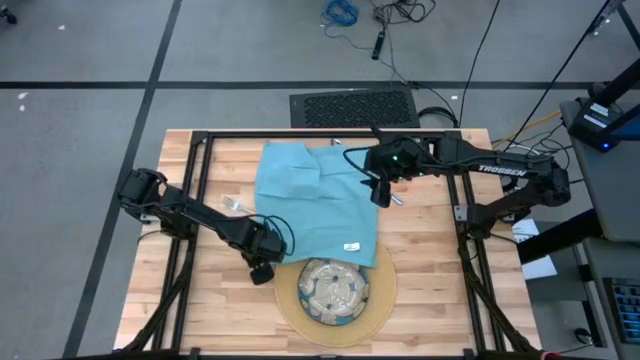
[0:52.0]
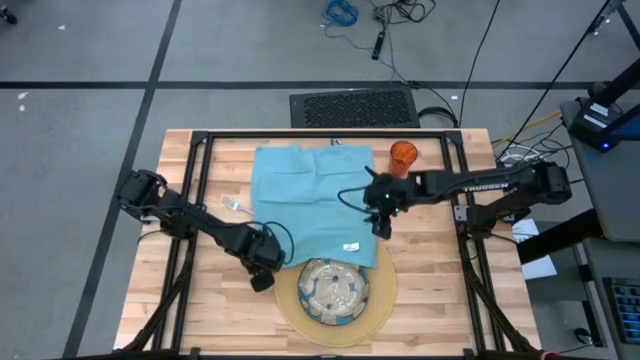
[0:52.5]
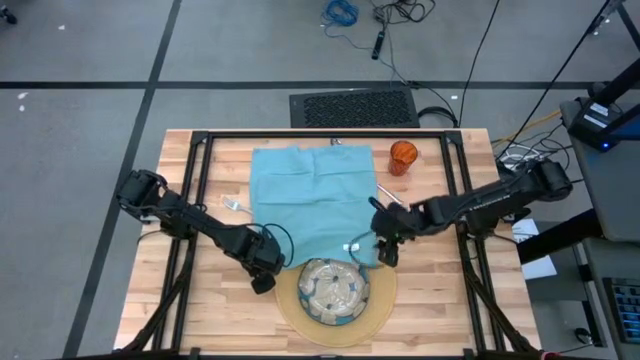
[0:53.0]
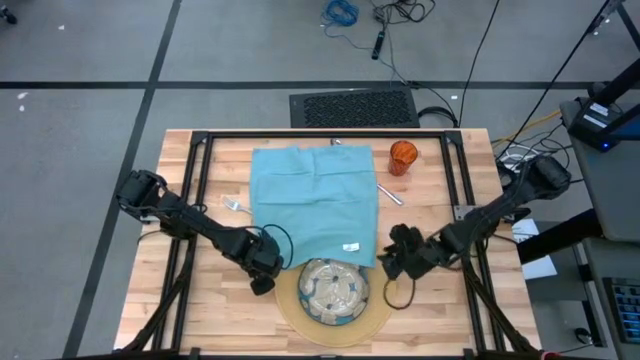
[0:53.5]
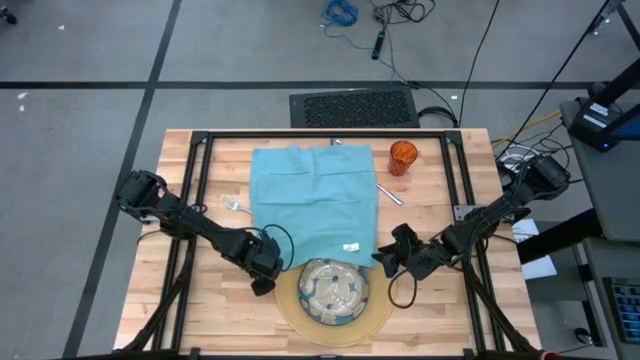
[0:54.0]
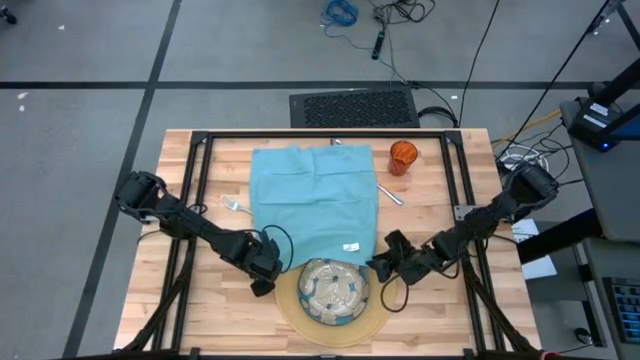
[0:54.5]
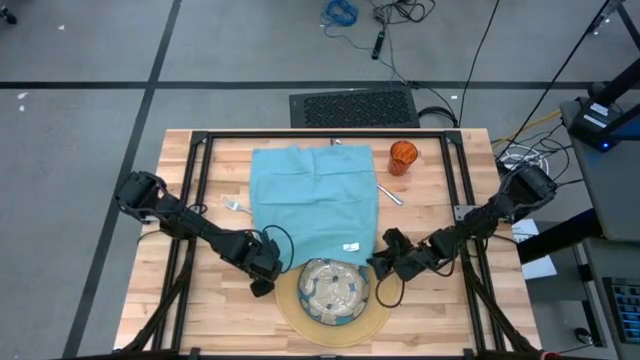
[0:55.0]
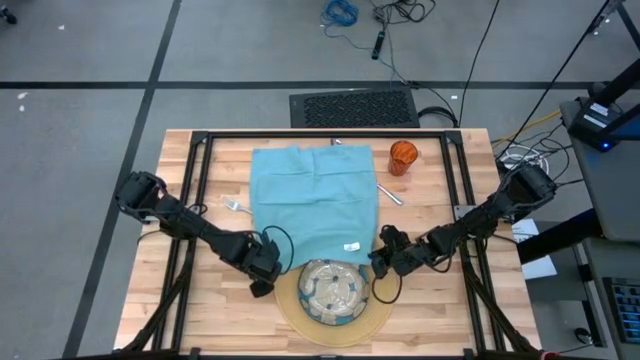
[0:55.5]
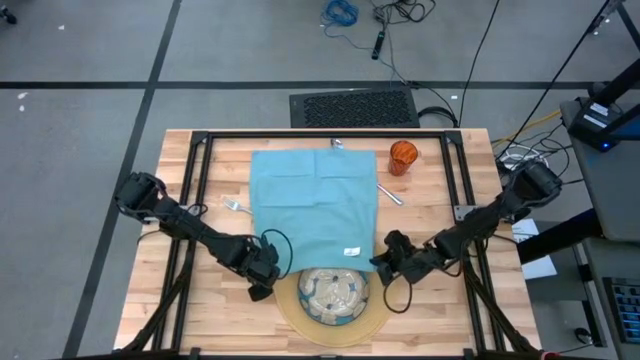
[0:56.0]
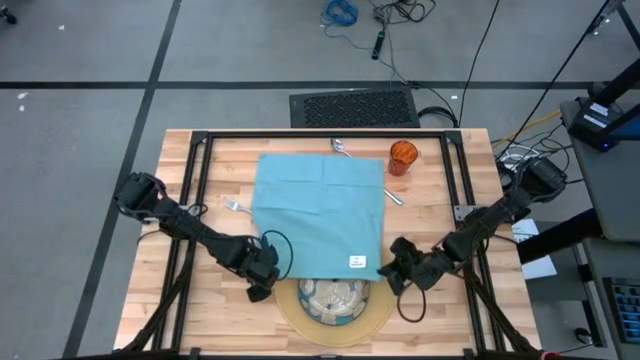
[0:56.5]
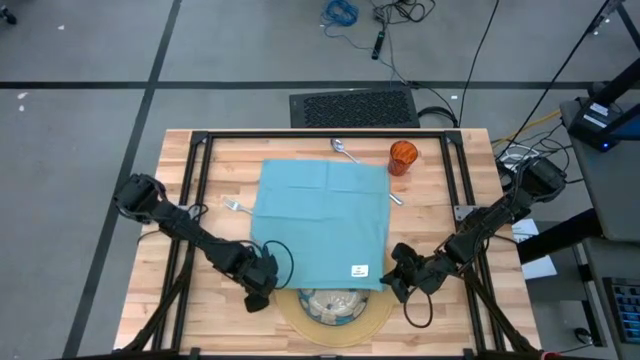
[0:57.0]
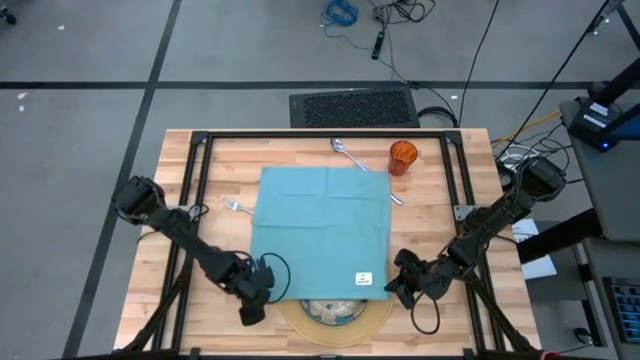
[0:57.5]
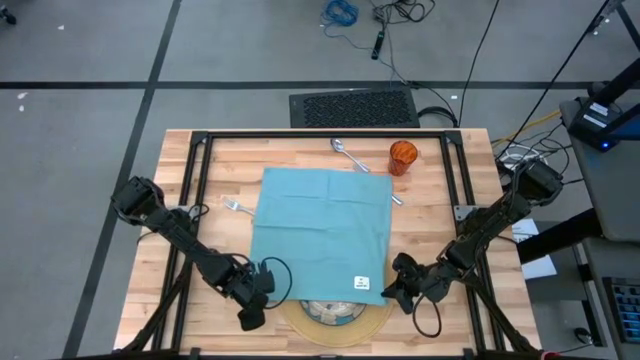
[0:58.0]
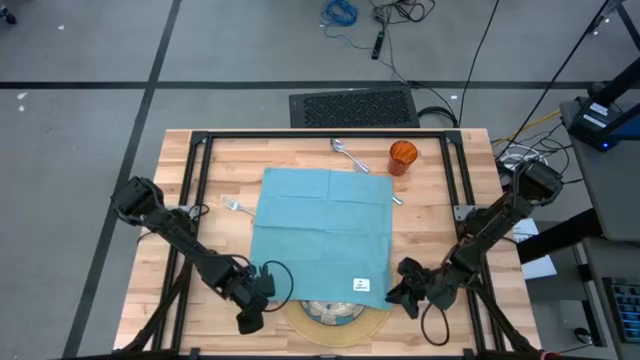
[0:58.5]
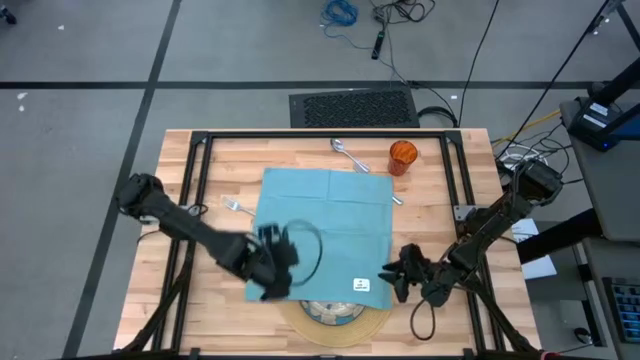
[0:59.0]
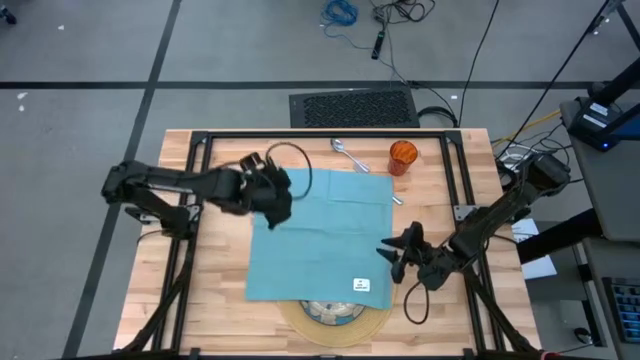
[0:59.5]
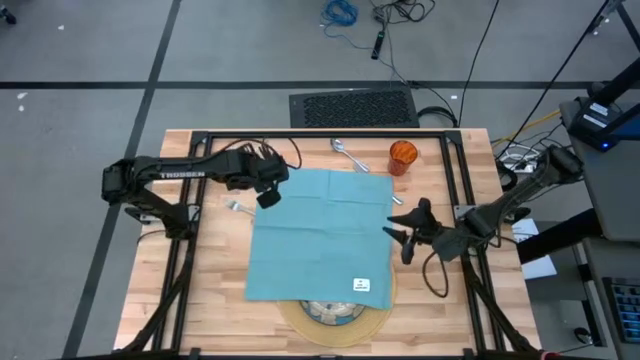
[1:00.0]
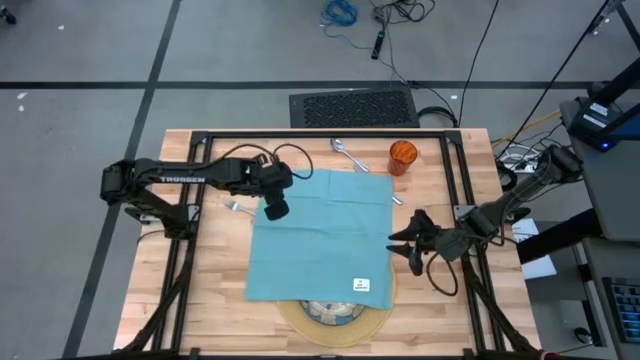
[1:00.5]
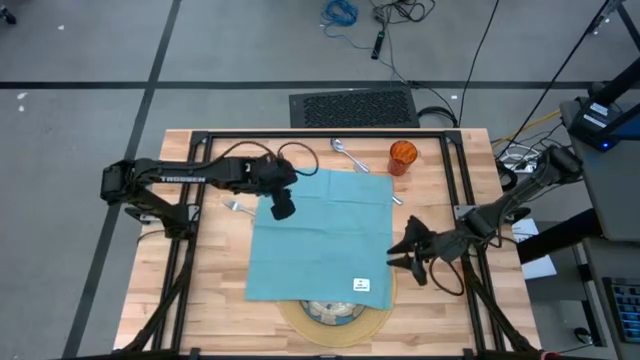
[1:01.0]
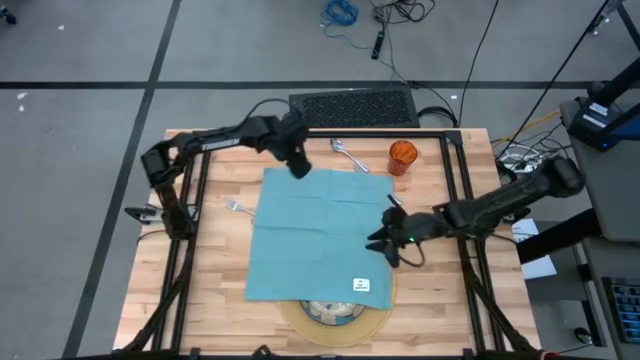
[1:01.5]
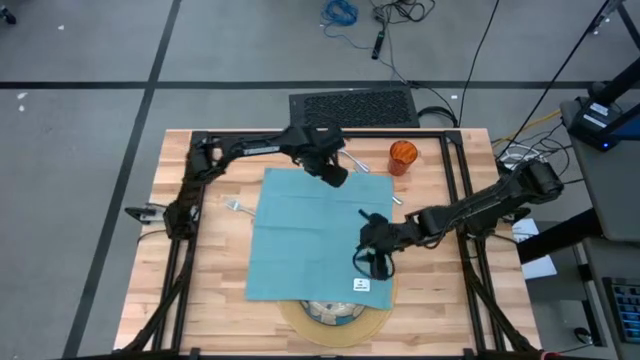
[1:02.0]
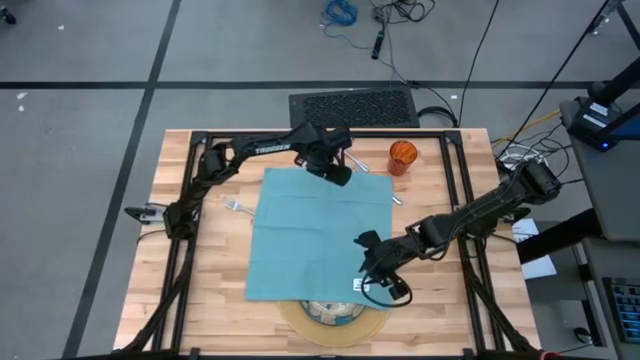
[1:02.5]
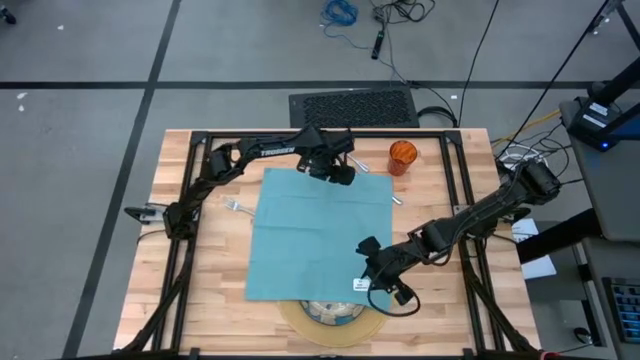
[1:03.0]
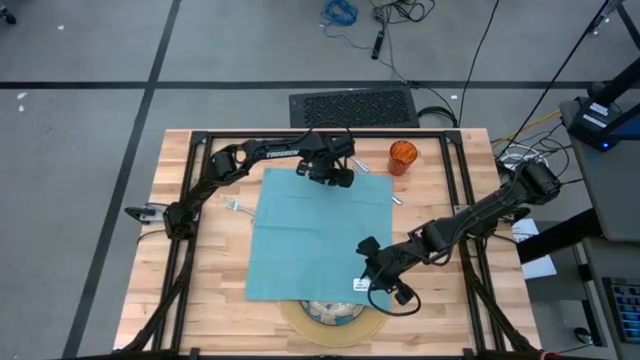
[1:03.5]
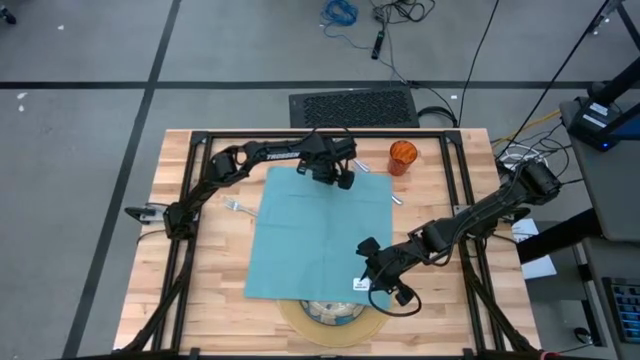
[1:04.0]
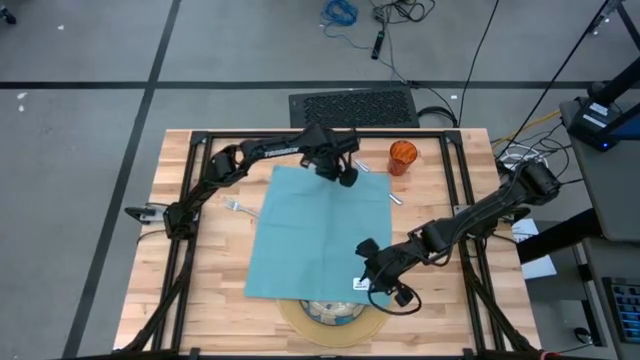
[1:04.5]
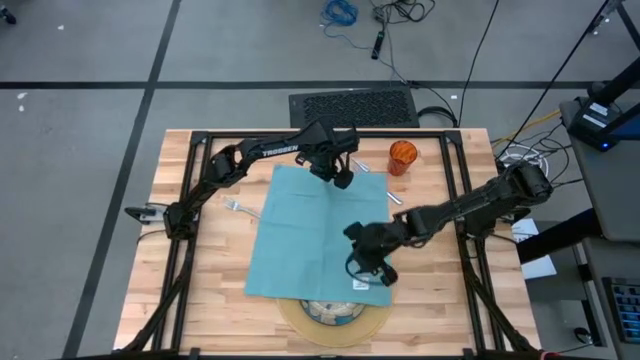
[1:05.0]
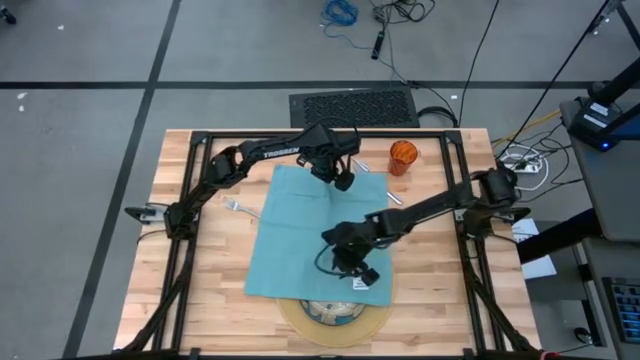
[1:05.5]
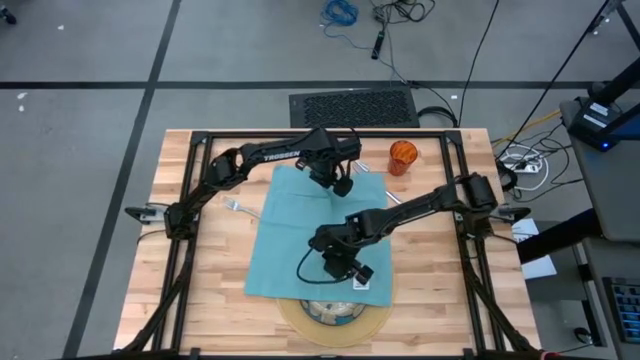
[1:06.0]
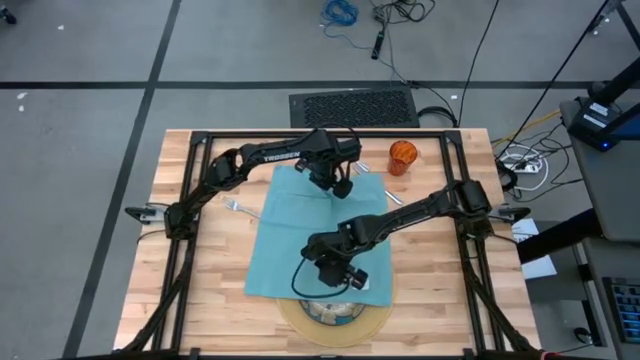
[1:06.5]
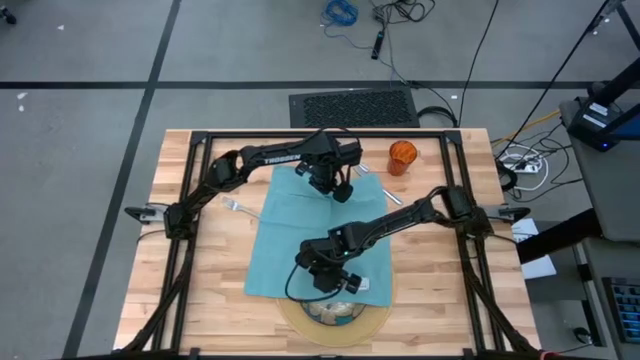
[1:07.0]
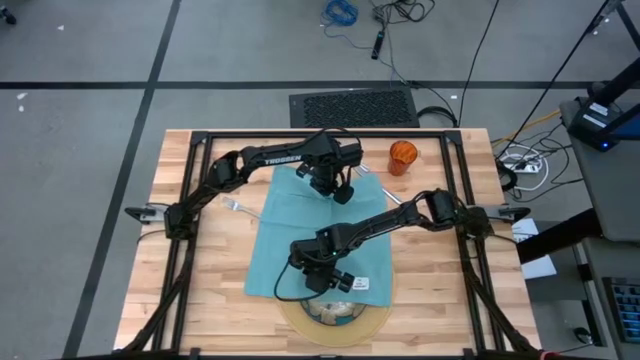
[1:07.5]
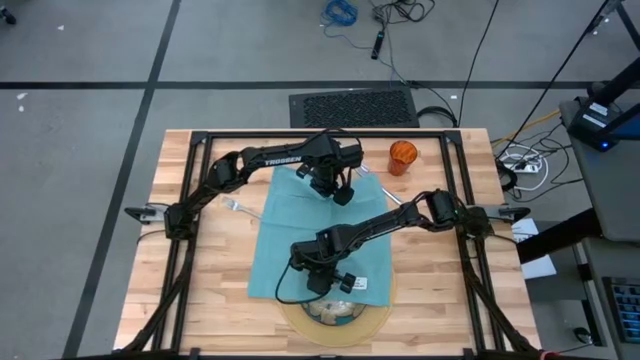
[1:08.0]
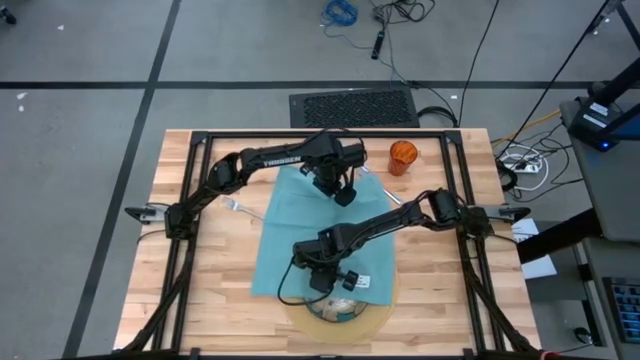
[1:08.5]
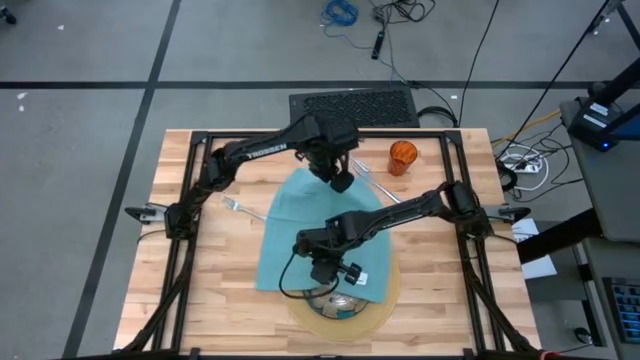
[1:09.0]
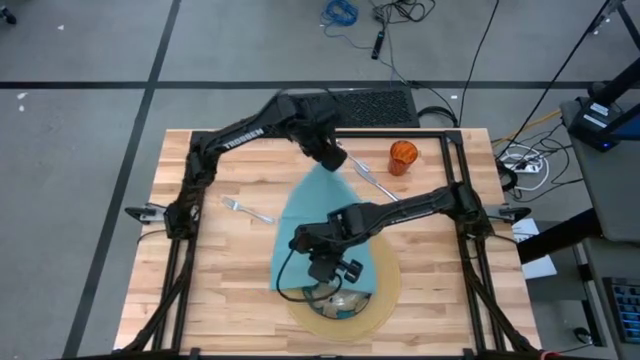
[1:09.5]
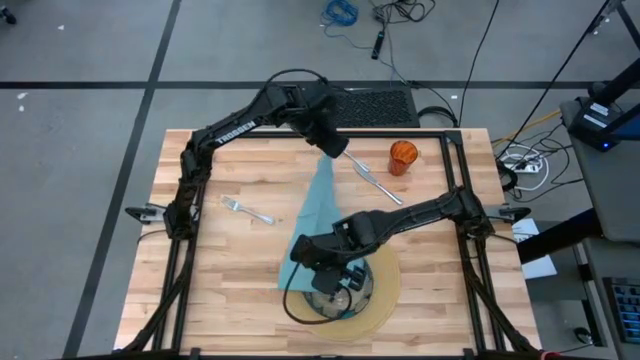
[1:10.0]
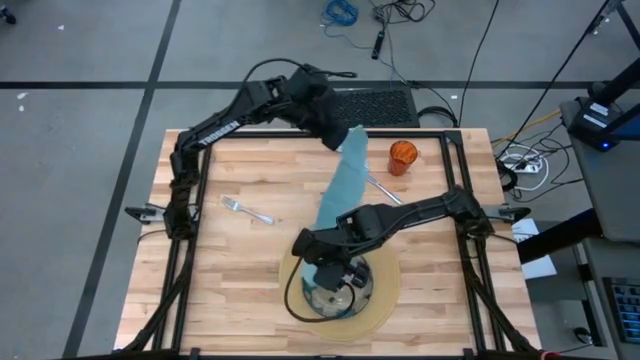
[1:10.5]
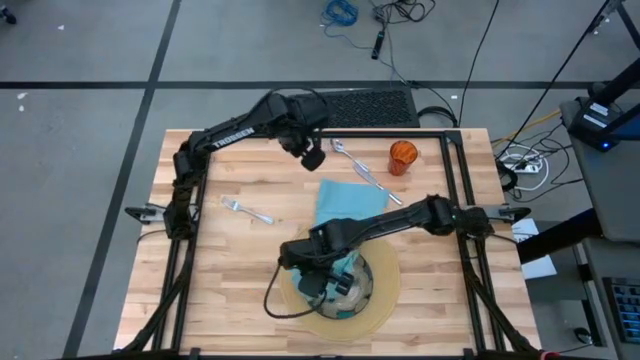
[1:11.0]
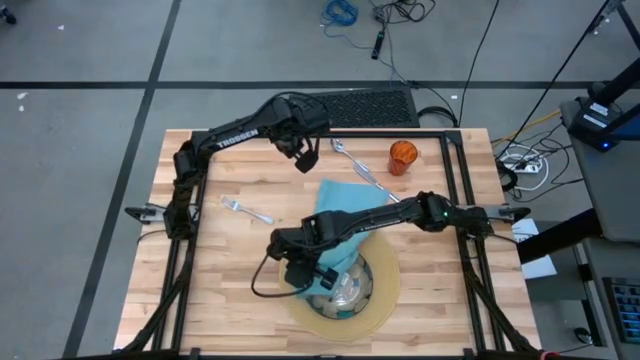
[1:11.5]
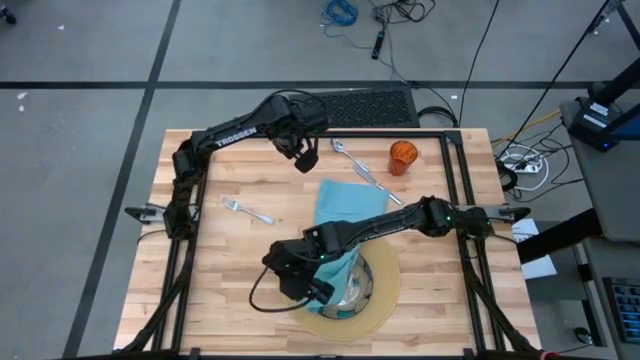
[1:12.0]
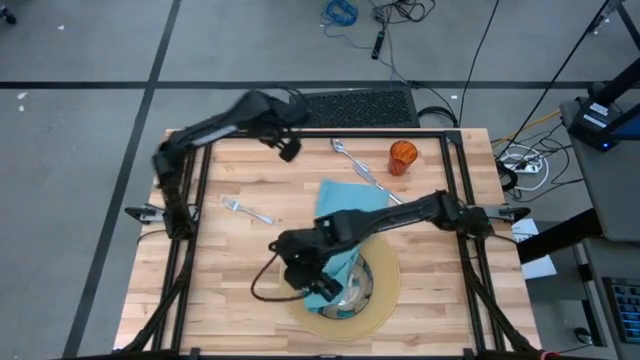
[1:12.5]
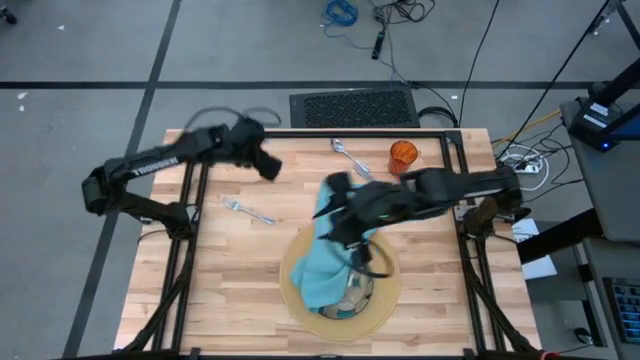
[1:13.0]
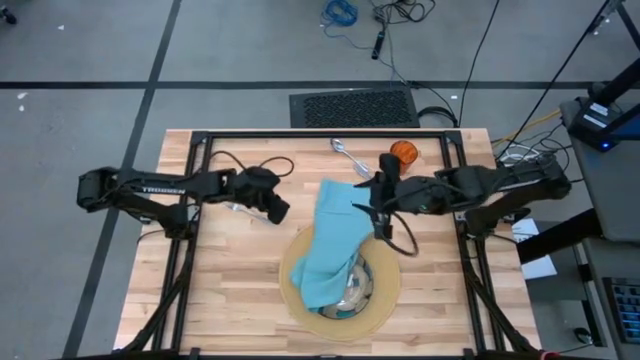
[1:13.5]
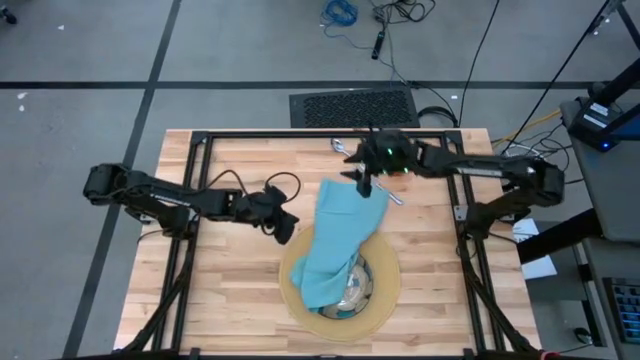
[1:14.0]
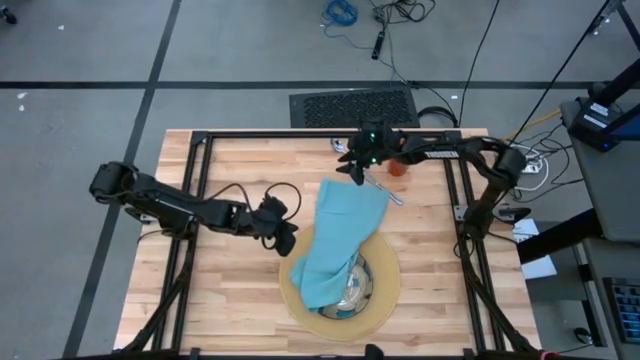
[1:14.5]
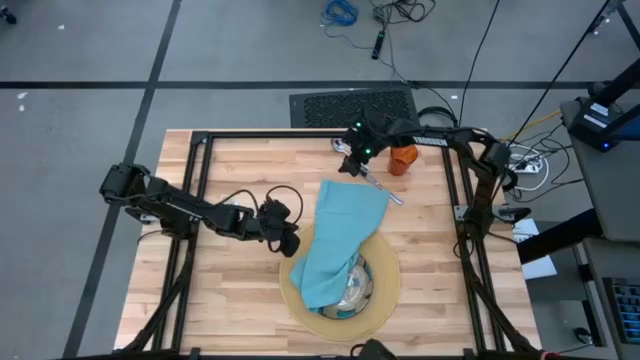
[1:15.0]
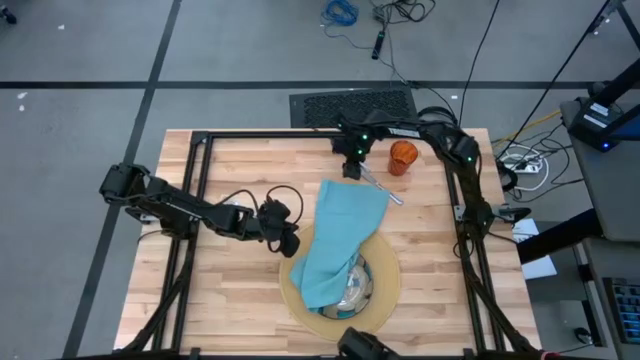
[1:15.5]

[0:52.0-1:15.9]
Task: Set table place
Fold the blue napkin
